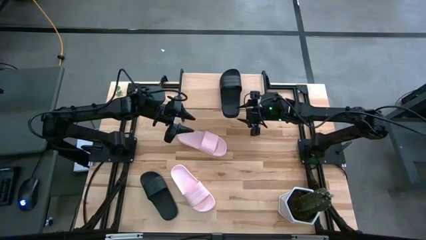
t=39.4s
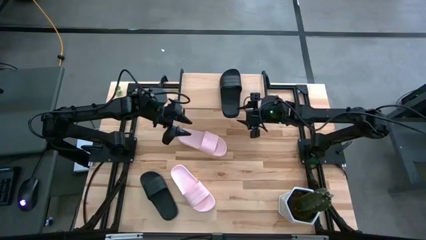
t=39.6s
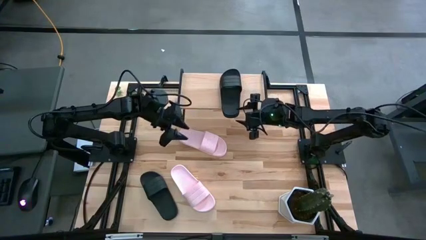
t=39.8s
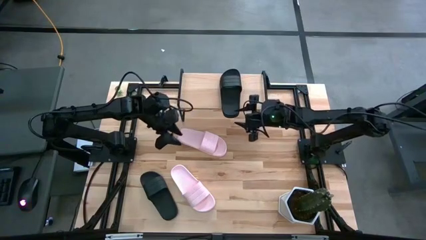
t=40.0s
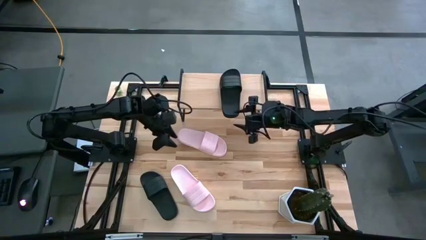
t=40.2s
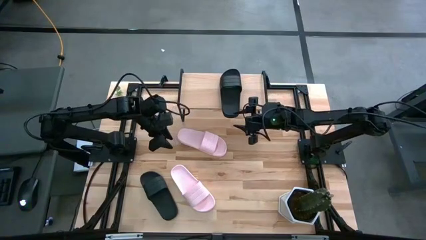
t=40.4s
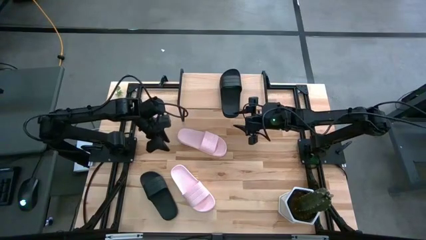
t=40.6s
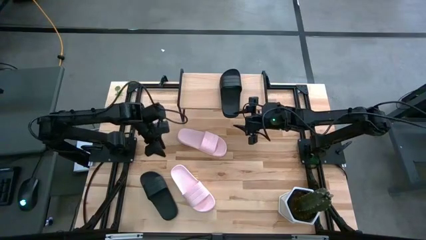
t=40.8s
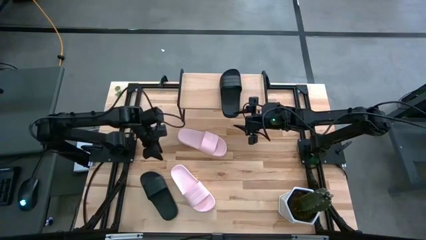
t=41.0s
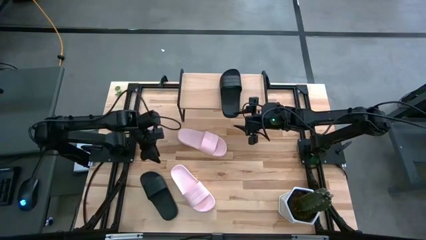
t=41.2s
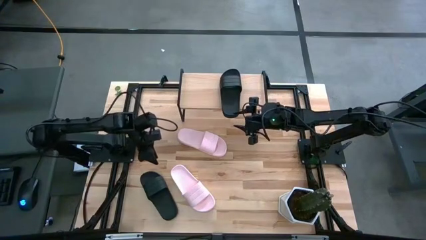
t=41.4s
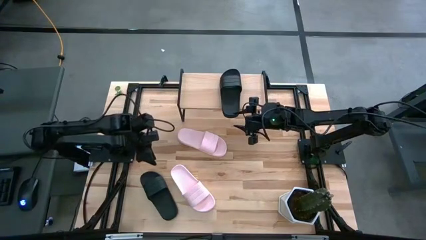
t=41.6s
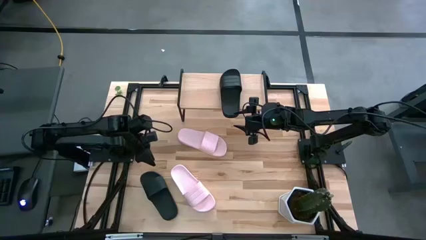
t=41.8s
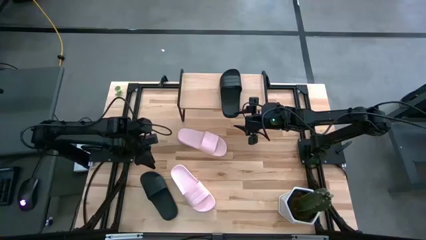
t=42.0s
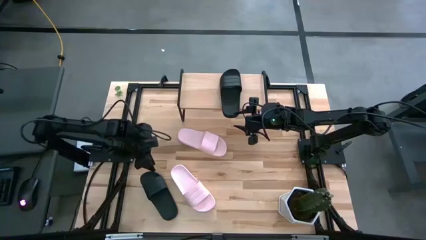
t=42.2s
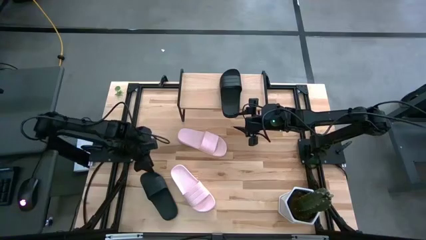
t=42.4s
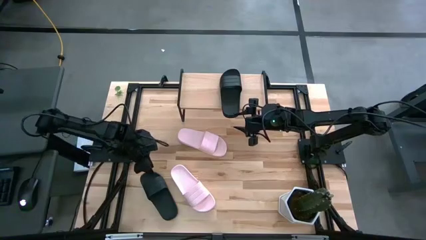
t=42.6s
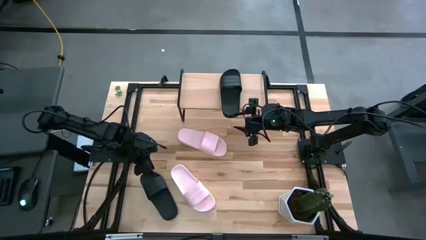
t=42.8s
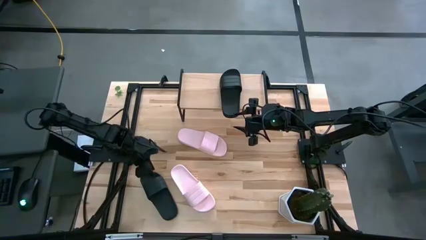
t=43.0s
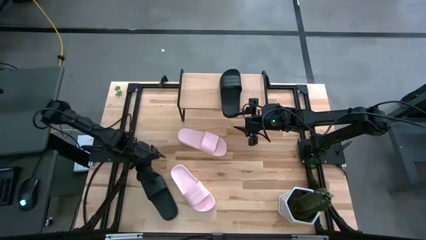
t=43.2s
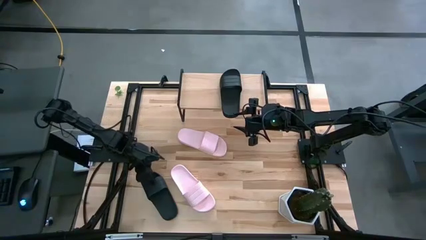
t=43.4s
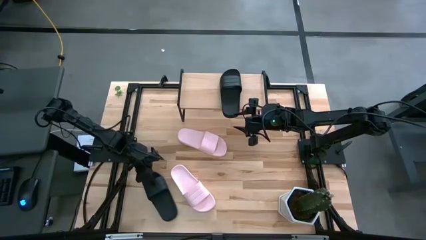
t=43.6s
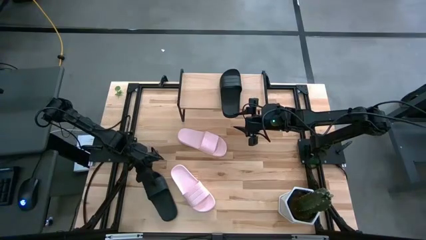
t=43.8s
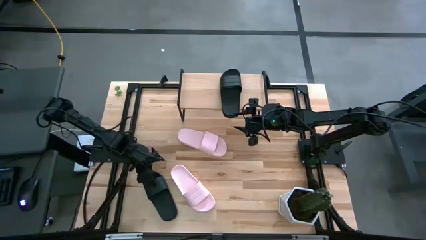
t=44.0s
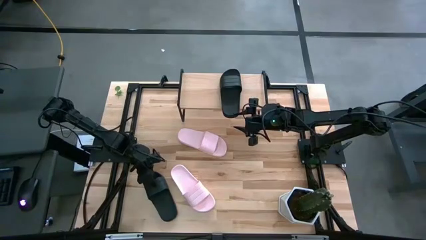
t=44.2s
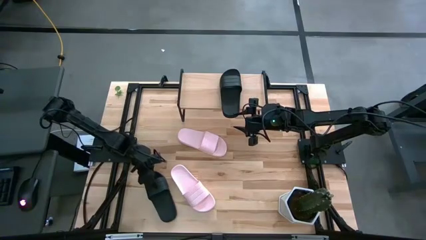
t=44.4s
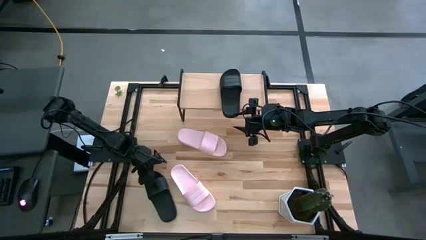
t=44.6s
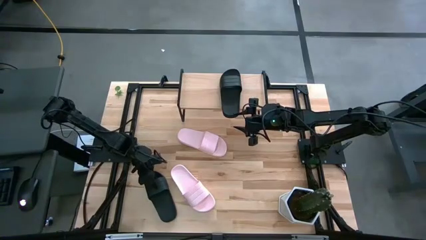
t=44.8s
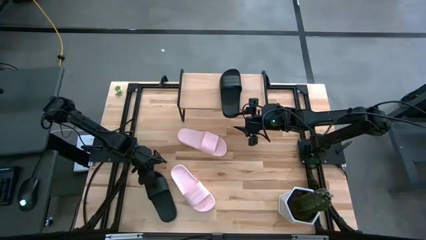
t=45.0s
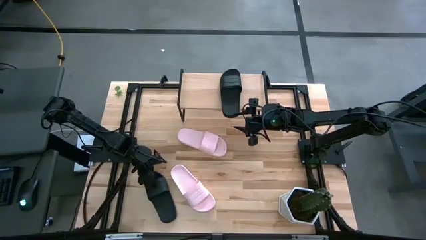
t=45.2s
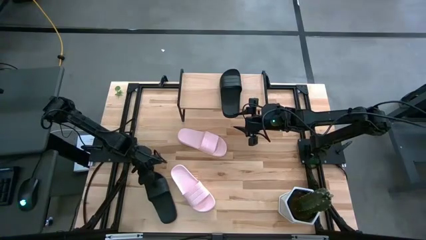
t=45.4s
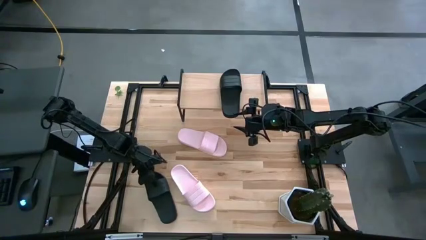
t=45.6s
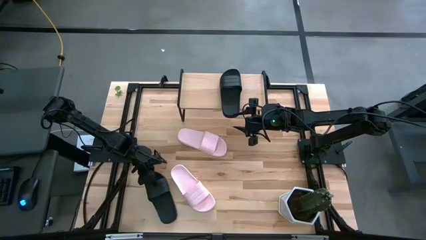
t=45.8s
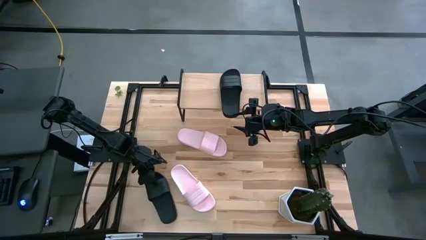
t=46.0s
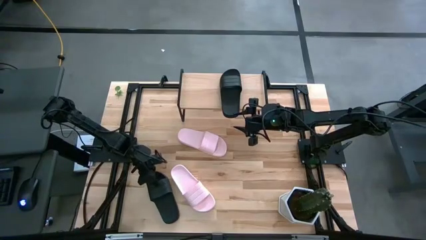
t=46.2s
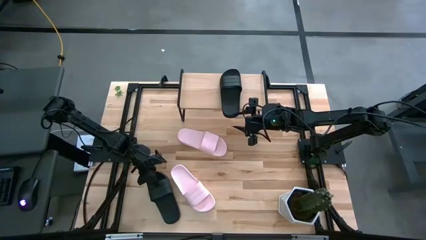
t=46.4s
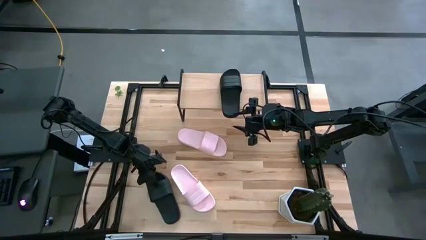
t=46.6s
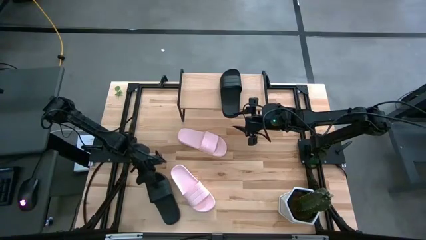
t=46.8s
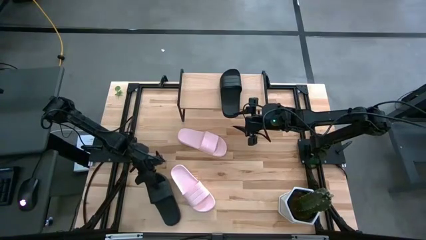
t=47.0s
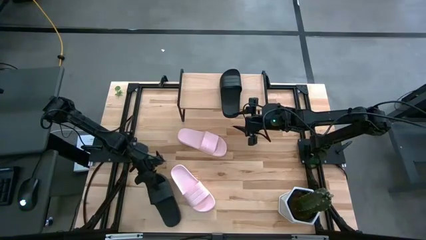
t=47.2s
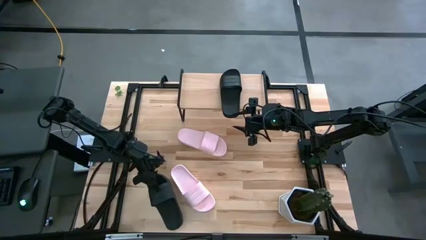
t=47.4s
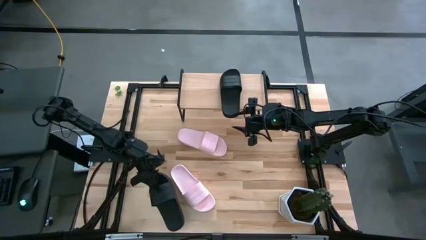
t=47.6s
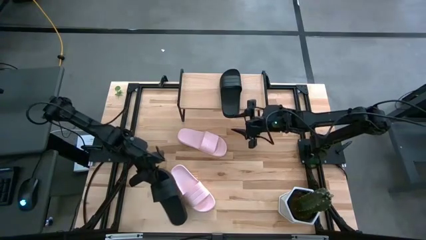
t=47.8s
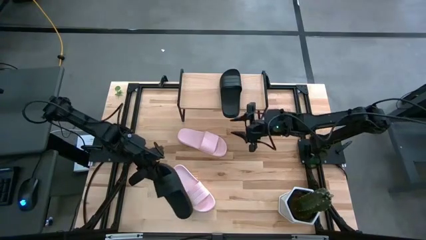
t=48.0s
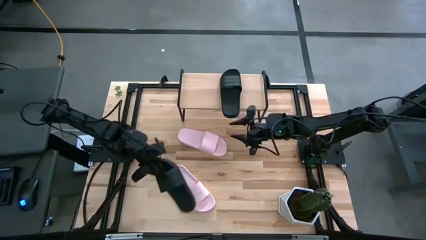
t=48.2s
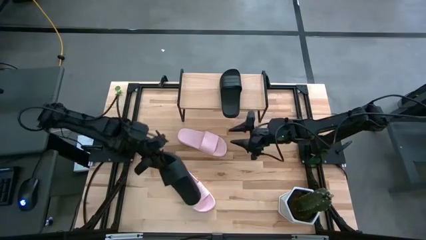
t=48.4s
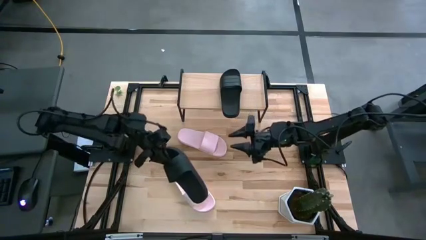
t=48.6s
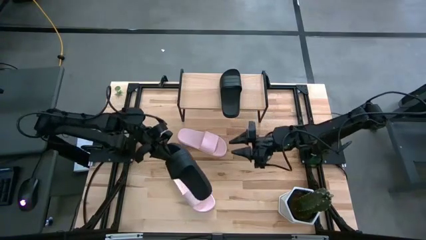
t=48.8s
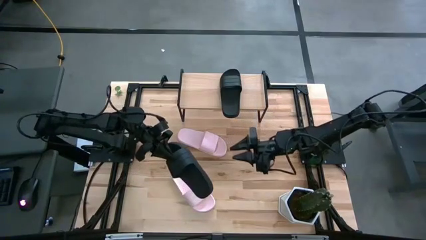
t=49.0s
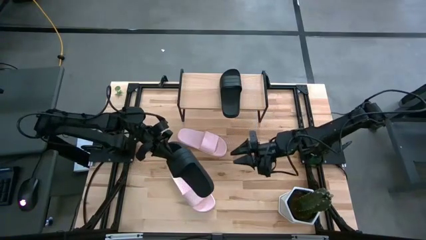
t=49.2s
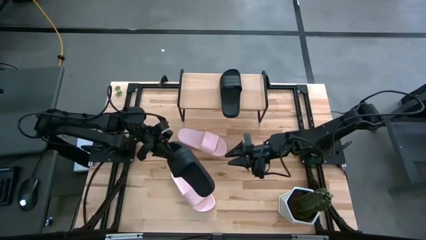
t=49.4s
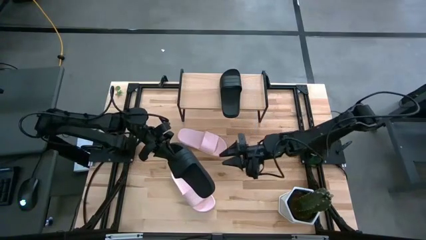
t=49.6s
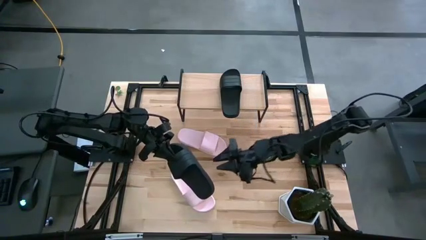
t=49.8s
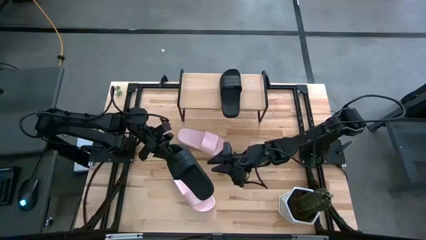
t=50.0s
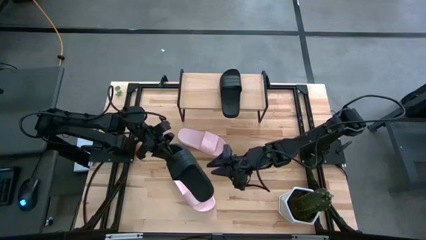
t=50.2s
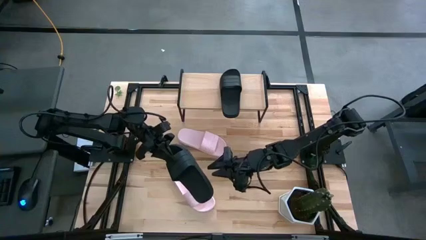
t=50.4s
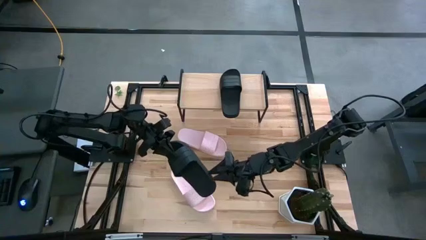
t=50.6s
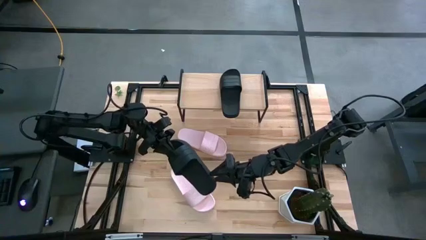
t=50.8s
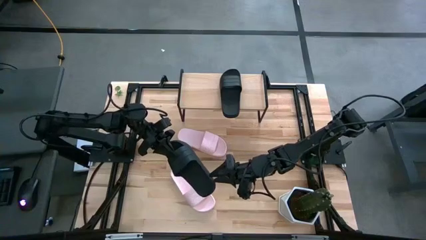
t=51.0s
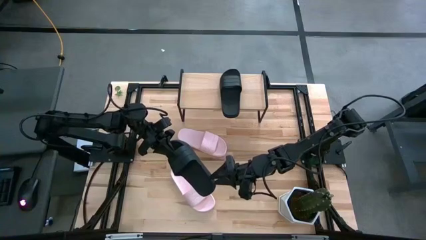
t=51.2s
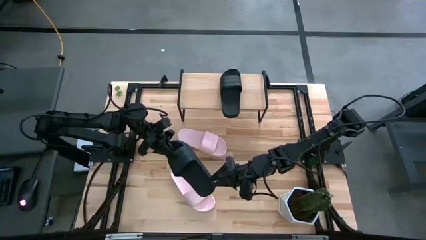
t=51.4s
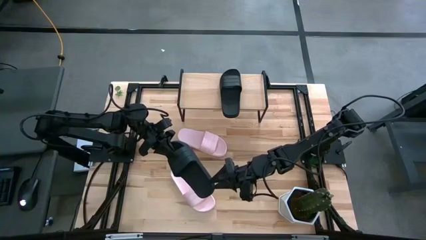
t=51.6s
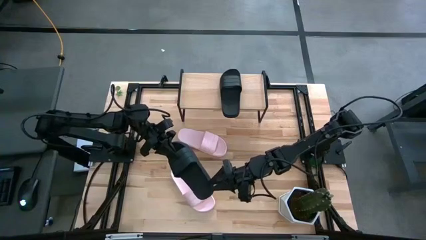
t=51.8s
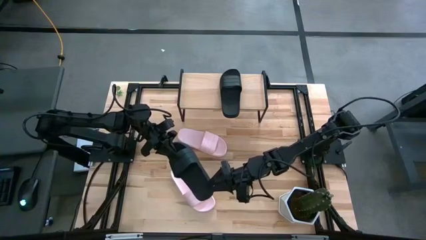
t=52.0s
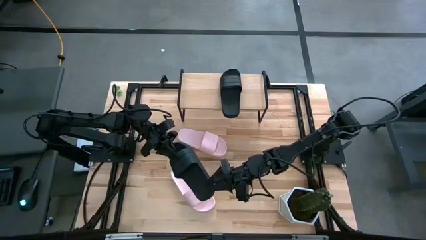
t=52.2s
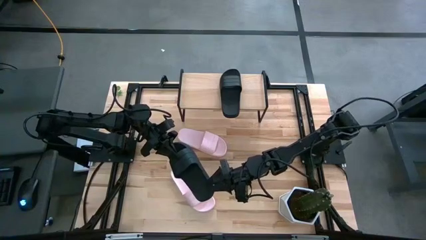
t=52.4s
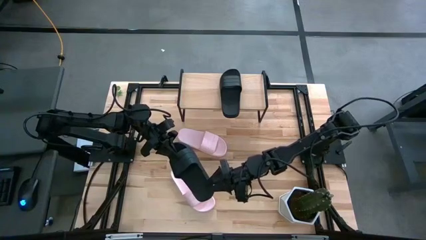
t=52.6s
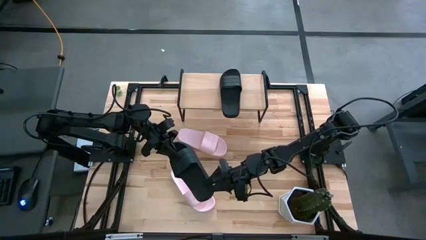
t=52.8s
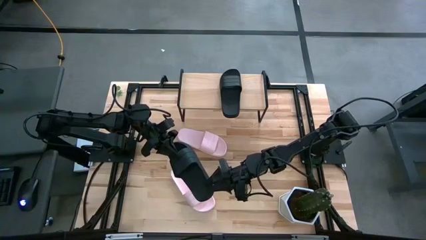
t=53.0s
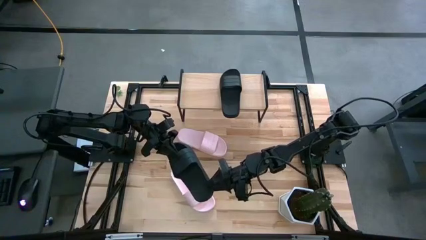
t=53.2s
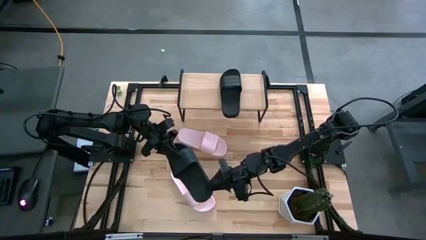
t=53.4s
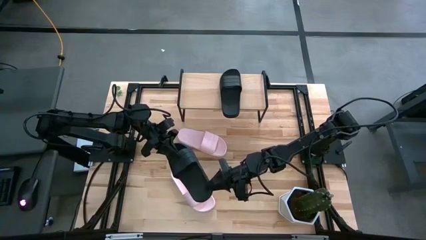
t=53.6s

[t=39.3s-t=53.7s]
Task: Pick and place slides into the shelf
Put the black slipper on the shelf
